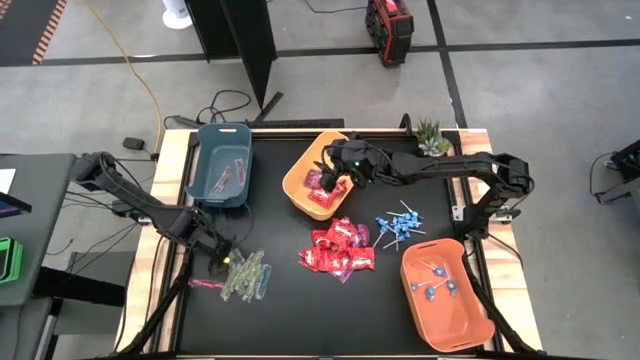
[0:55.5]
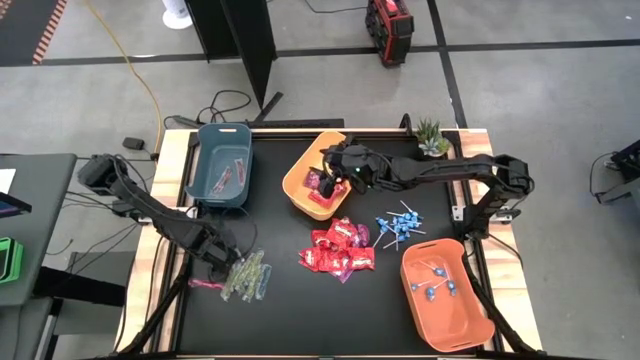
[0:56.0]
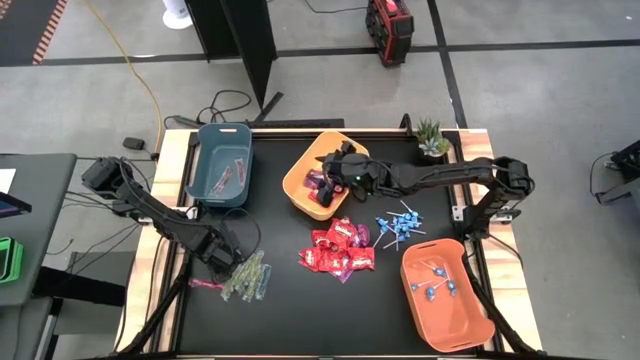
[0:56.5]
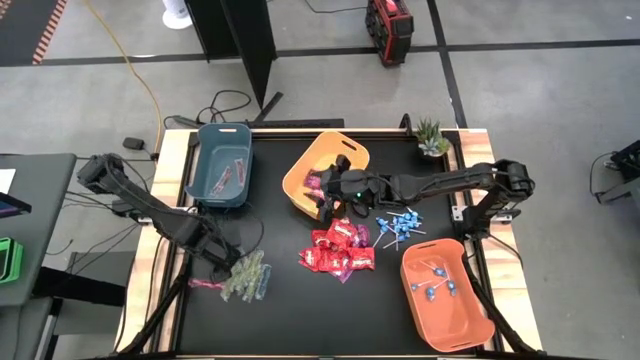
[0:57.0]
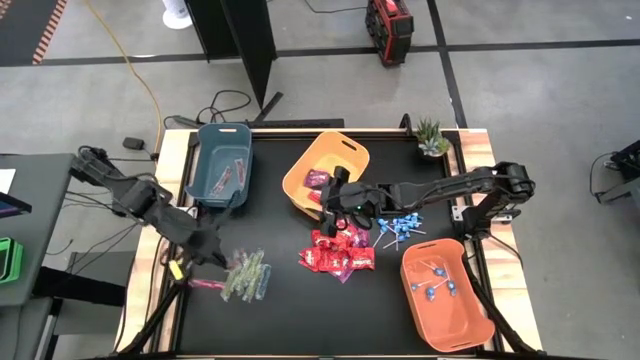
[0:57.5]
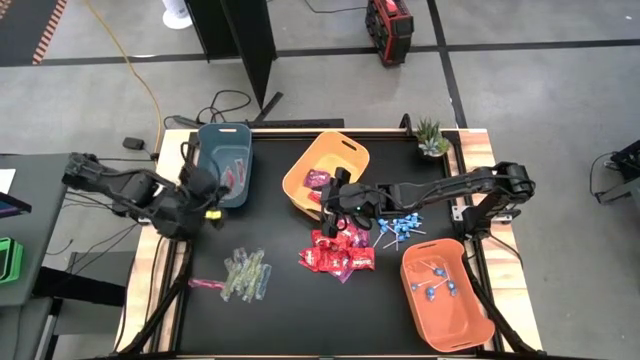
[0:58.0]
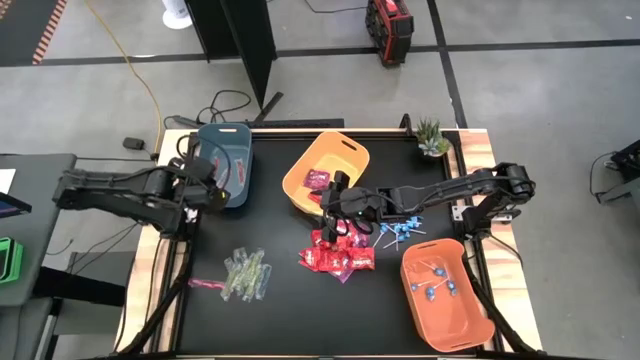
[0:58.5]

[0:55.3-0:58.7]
Task: Sort candy
Put the red gummy into the blue bin

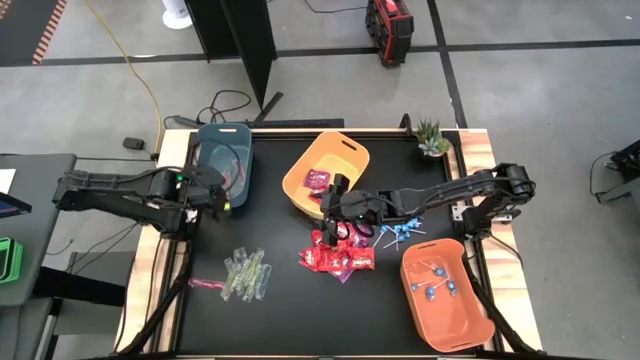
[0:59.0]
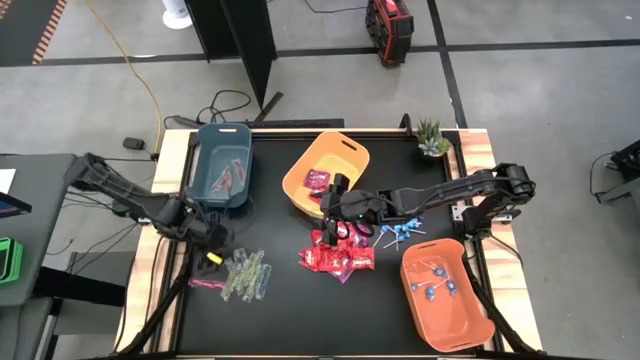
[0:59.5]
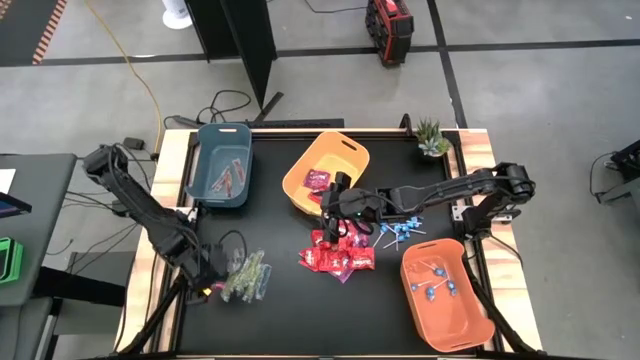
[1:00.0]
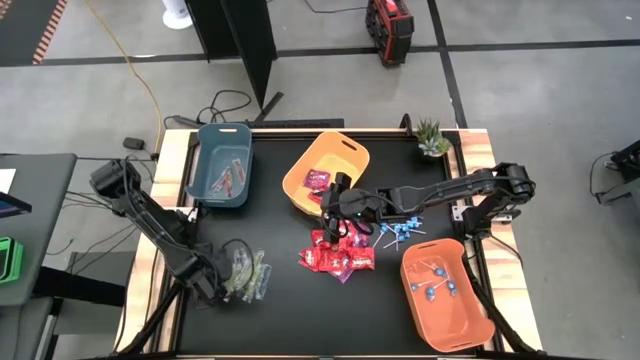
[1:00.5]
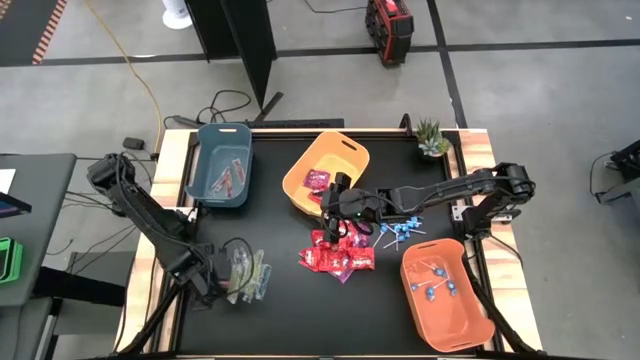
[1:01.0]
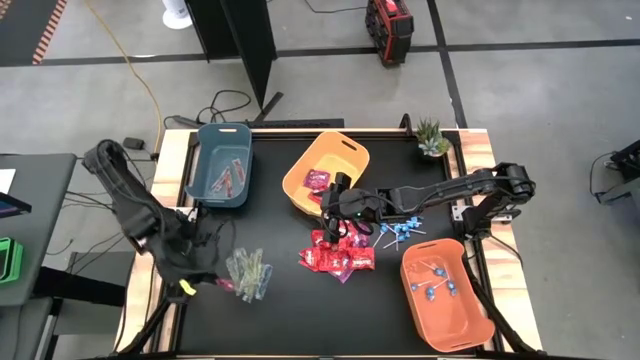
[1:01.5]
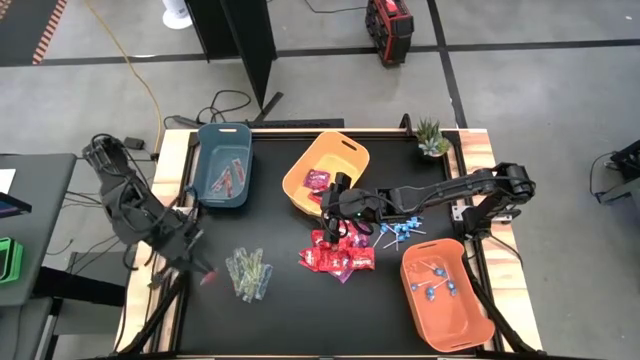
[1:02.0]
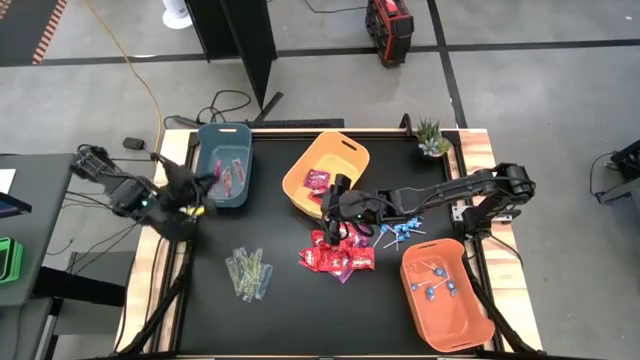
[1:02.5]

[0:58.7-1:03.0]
Put the red gummy into the blue bin

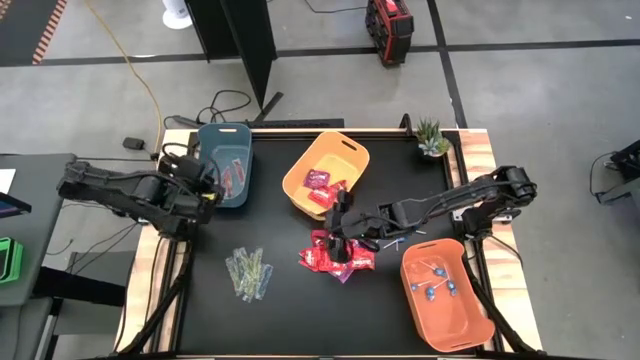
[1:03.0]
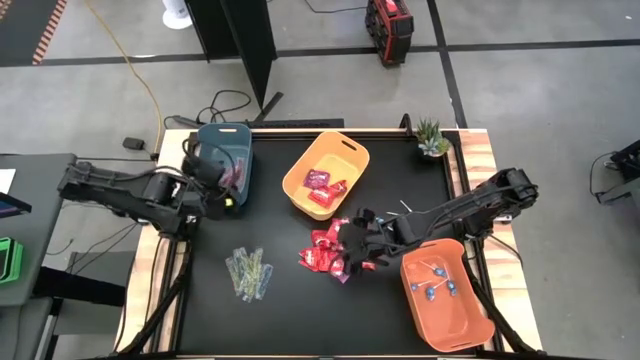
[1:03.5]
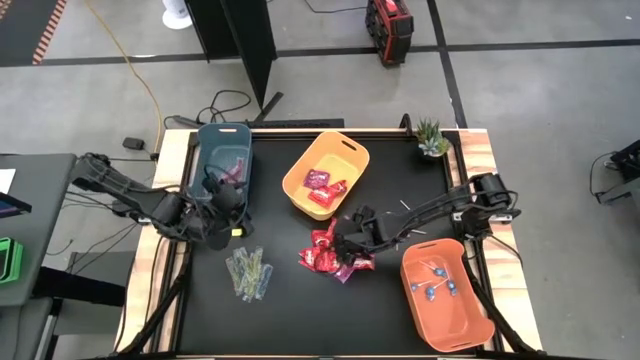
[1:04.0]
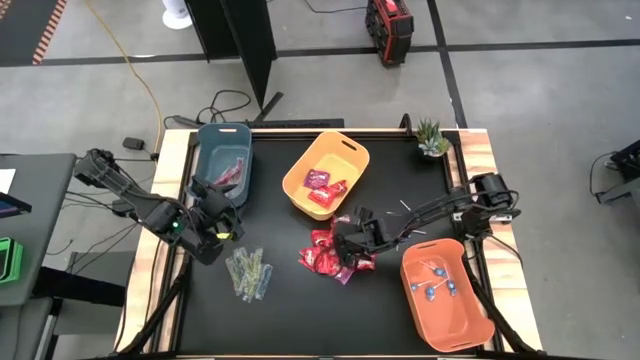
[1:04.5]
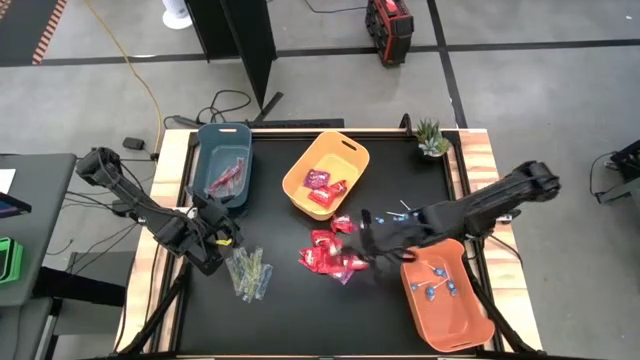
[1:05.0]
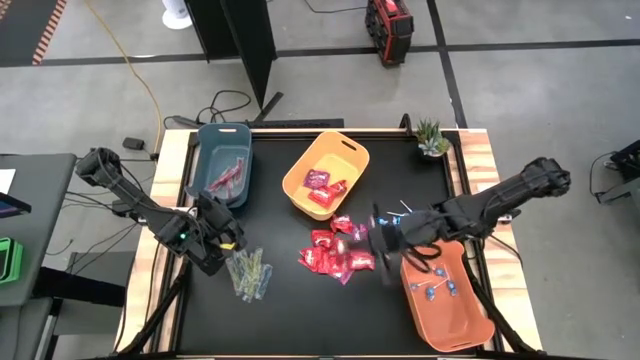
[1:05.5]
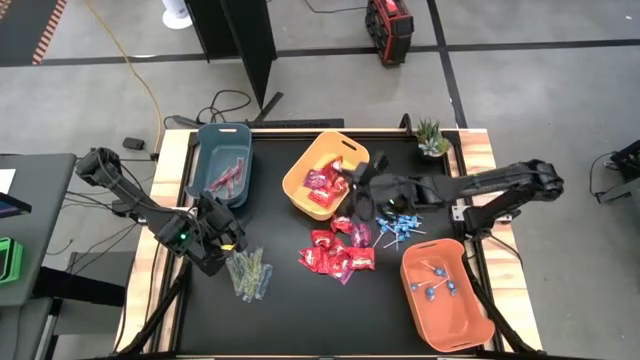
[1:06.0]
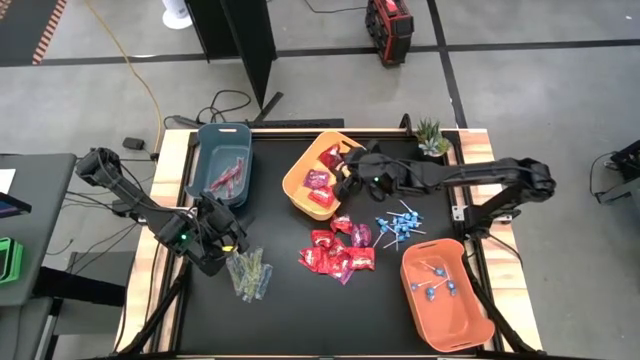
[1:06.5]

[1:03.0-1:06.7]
Put the red candy into the yellow bin

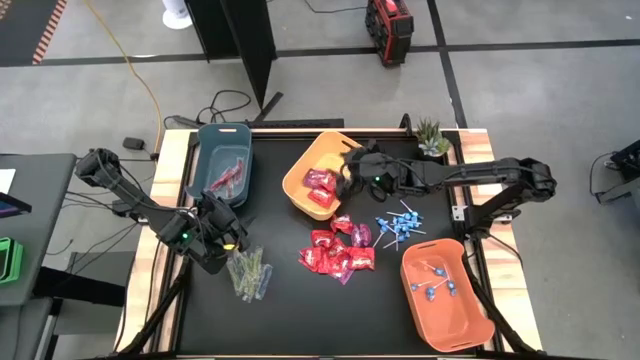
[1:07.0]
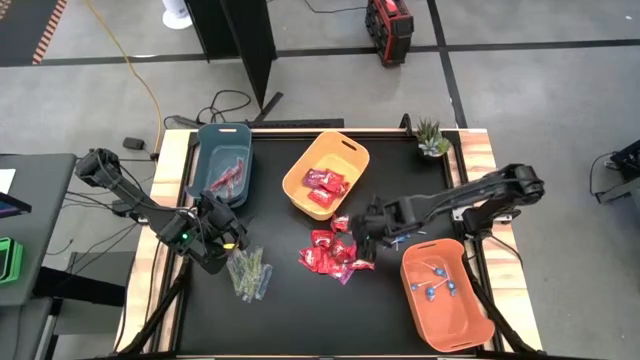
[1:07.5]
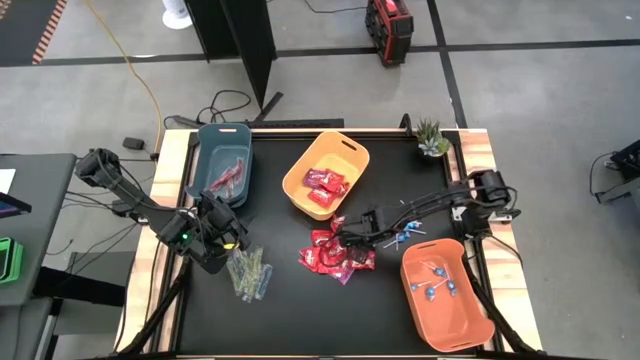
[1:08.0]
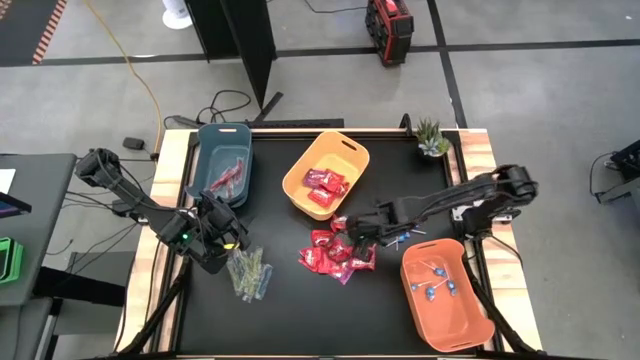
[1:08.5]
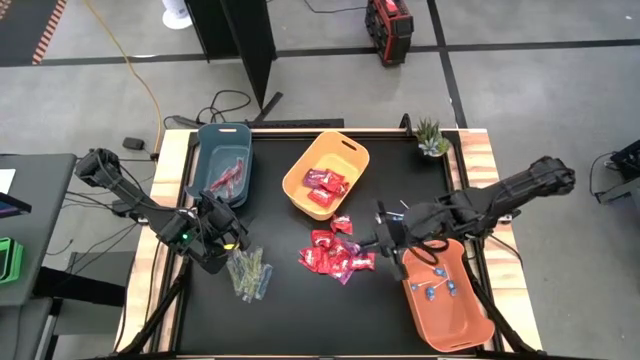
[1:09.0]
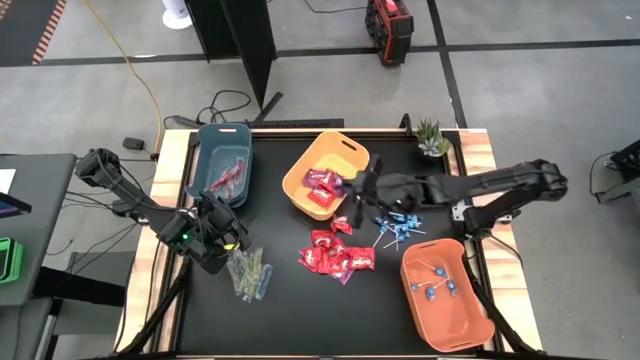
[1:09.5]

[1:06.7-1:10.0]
Put the purple candy into the yellow bin

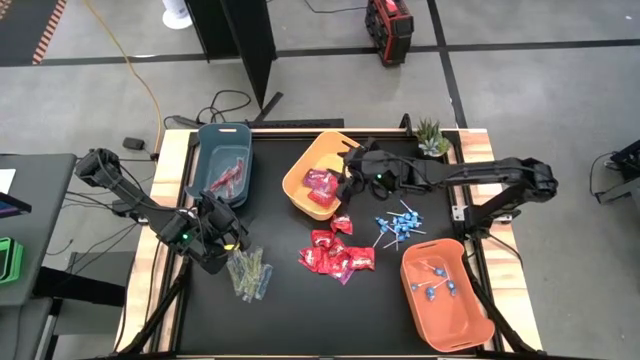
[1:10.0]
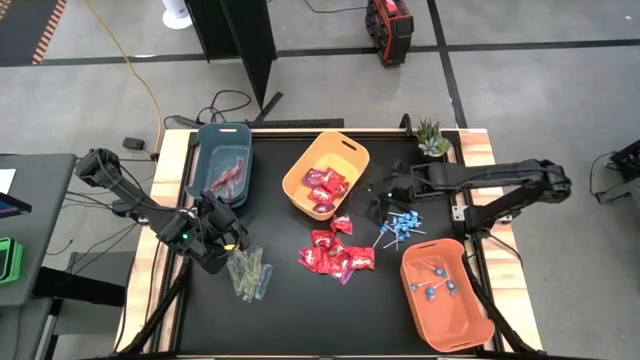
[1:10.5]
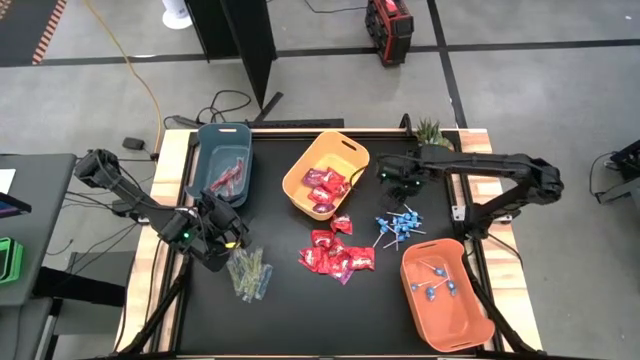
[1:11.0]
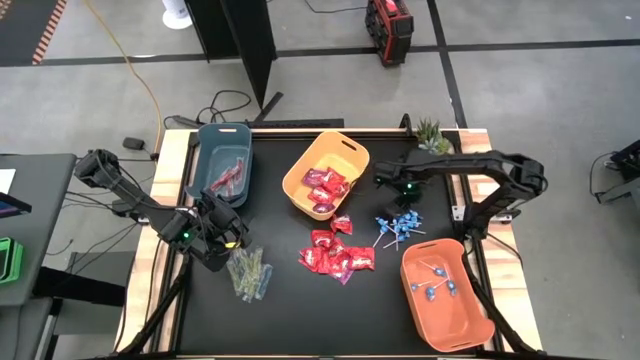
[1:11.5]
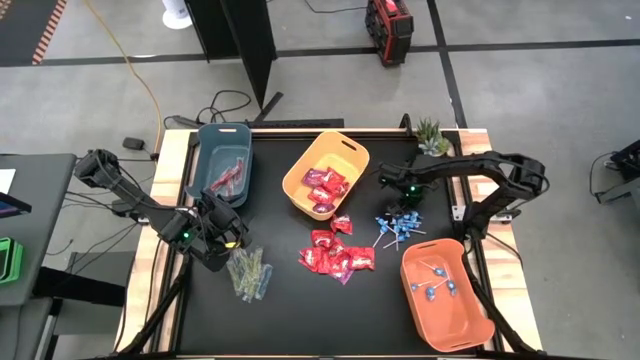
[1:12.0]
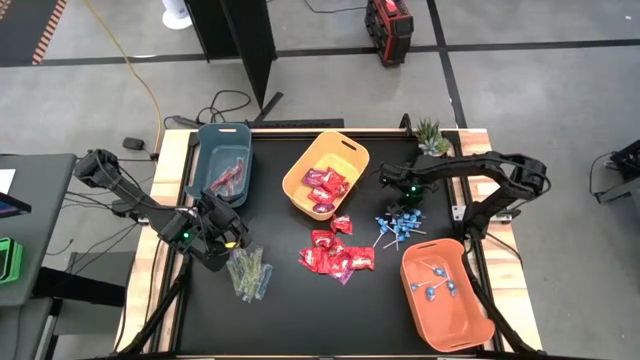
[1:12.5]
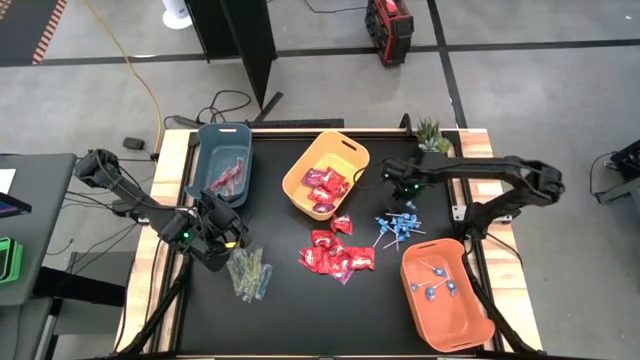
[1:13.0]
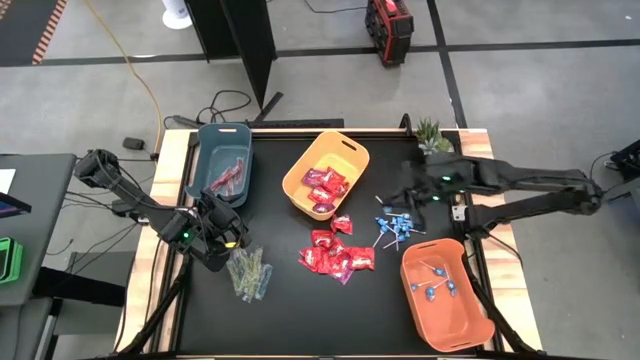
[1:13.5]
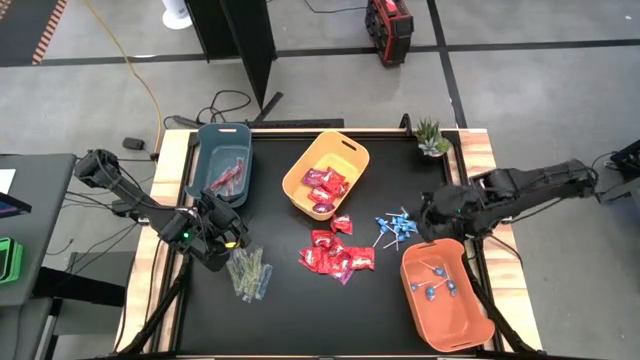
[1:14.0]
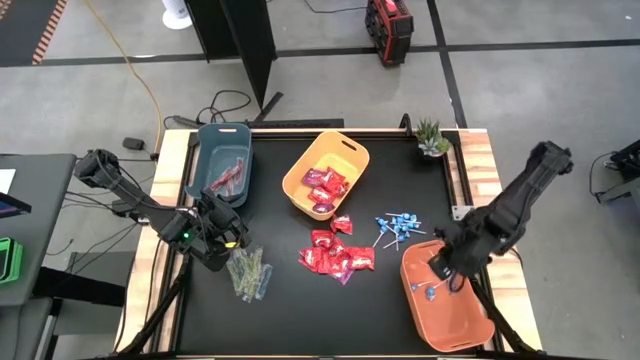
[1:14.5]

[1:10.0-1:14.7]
Put the blue lollipop into the orange bin

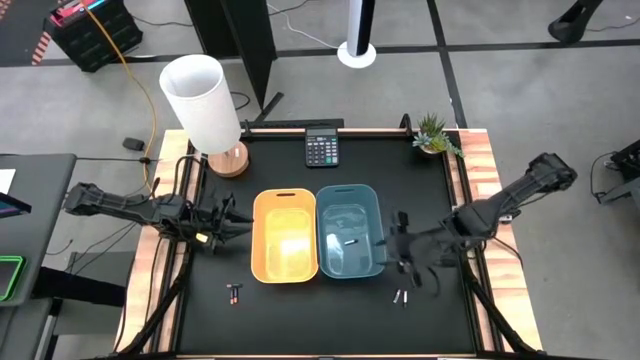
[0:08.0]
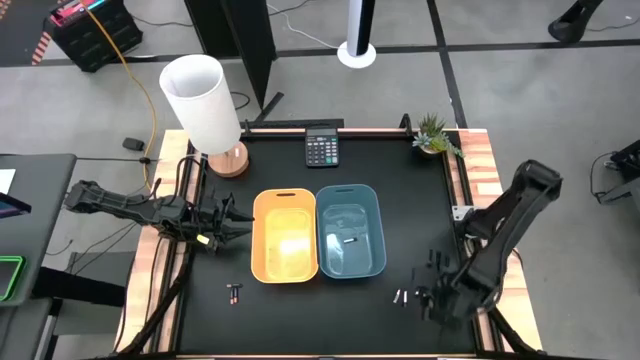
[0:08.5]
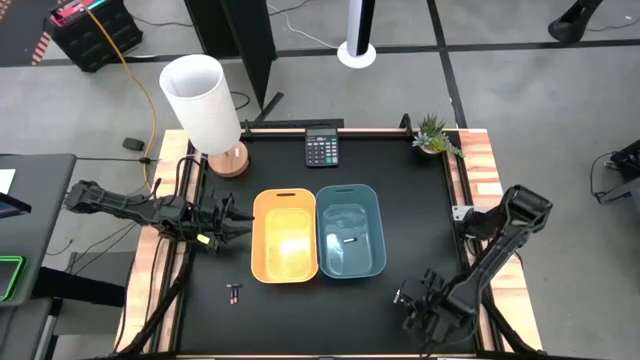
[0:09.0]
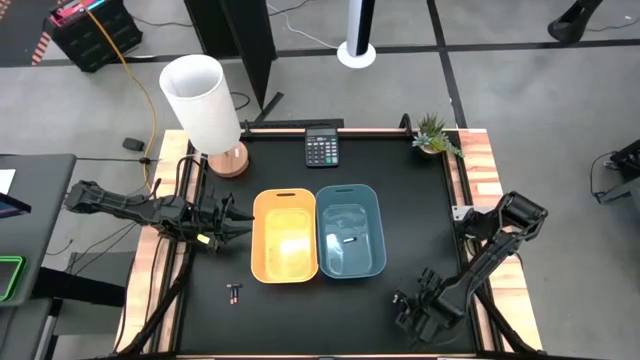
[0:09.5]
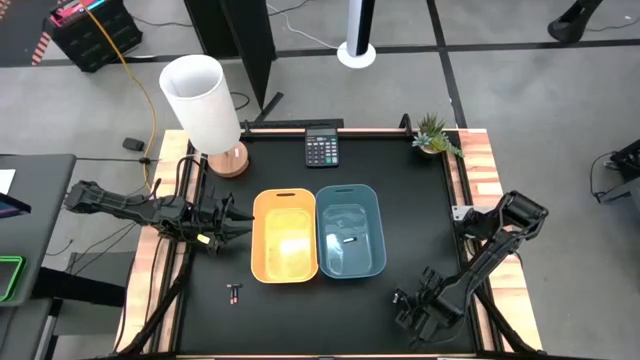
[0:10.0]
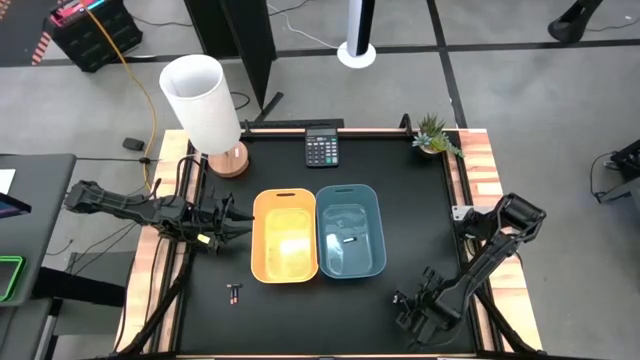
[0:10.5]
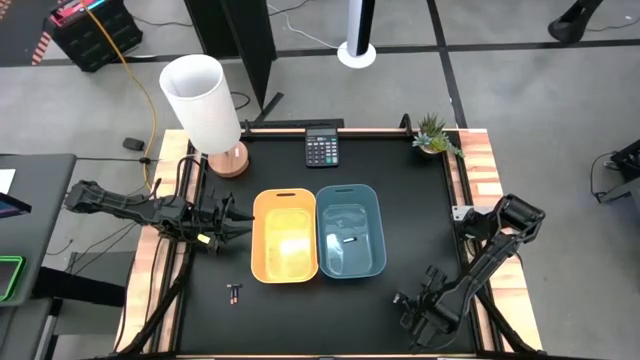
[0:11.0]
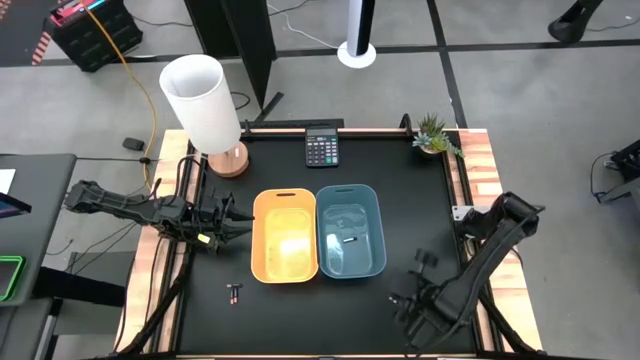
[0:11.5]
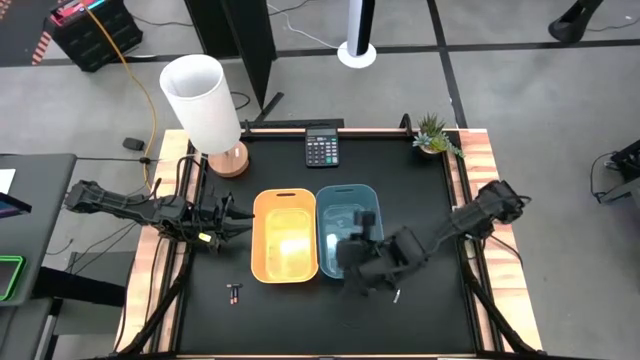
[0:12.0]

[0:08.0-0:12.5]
Task: Sort batteries
Put the right silver battery into the blue bin
